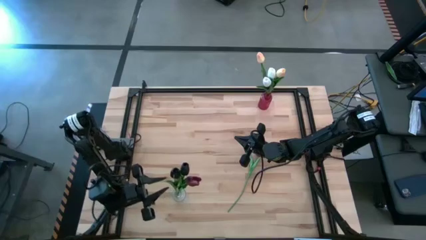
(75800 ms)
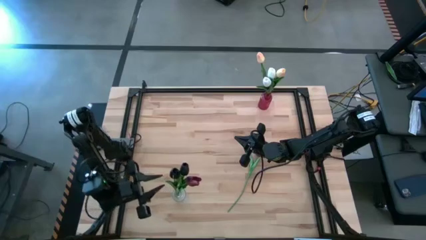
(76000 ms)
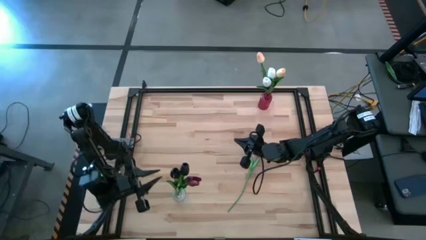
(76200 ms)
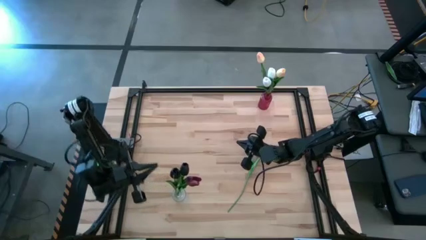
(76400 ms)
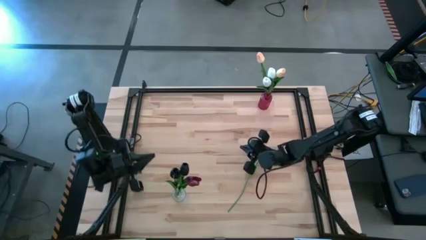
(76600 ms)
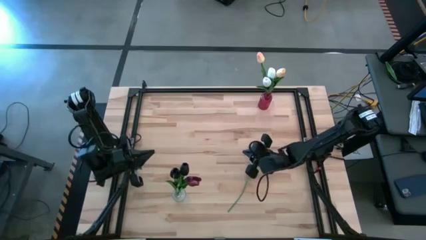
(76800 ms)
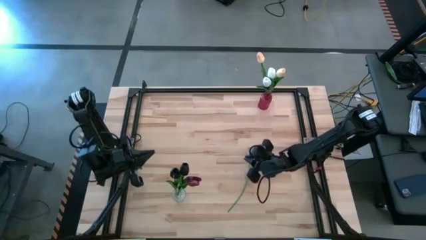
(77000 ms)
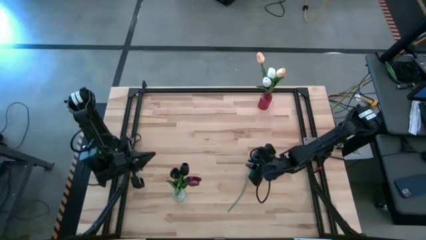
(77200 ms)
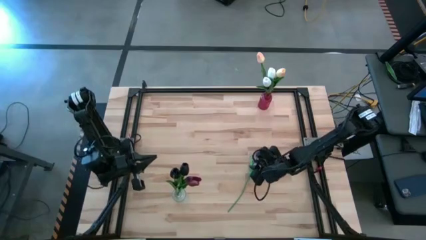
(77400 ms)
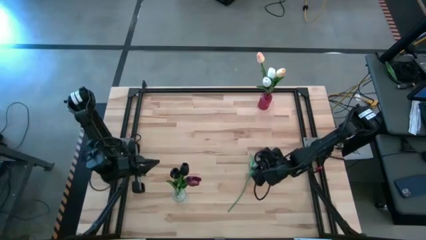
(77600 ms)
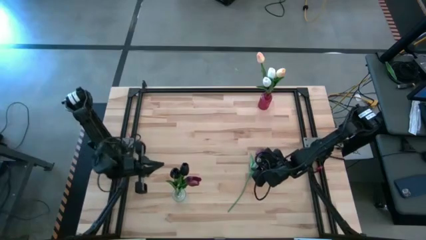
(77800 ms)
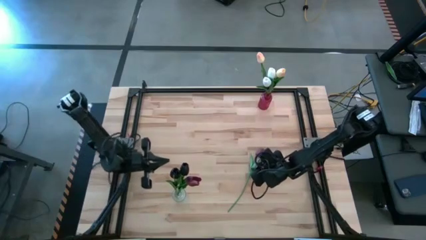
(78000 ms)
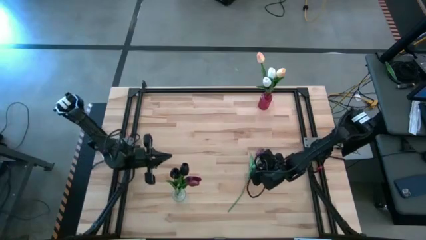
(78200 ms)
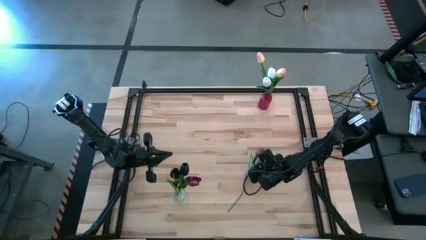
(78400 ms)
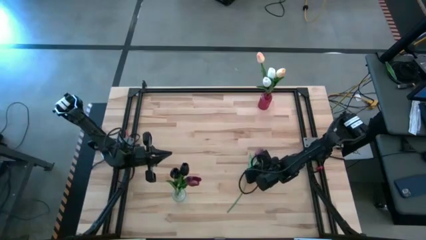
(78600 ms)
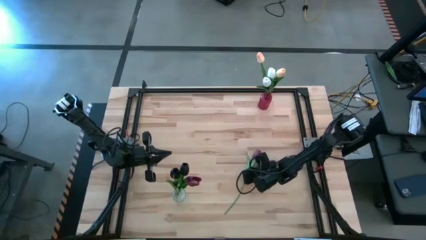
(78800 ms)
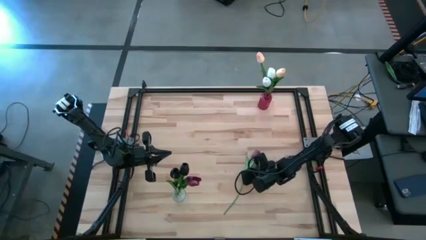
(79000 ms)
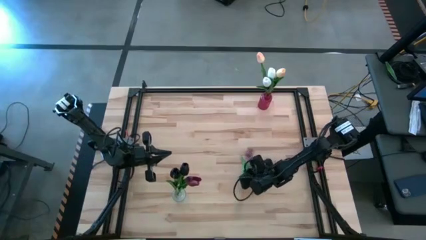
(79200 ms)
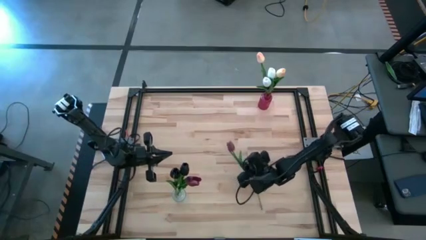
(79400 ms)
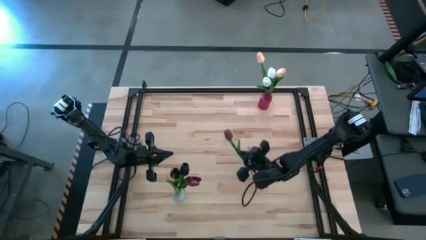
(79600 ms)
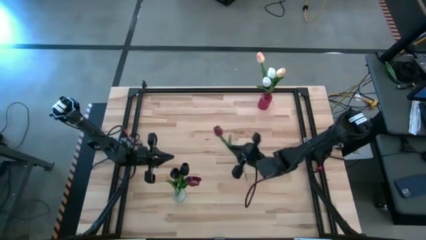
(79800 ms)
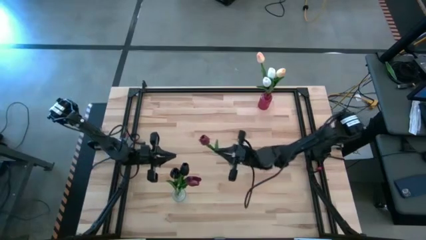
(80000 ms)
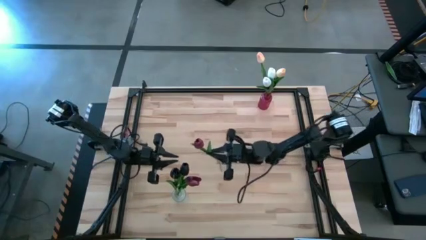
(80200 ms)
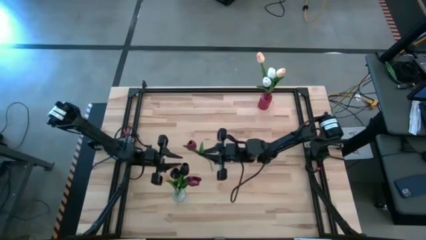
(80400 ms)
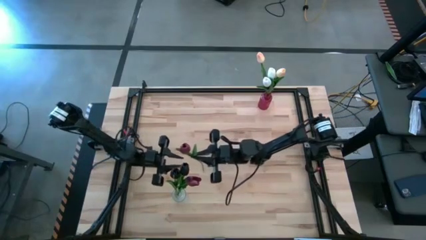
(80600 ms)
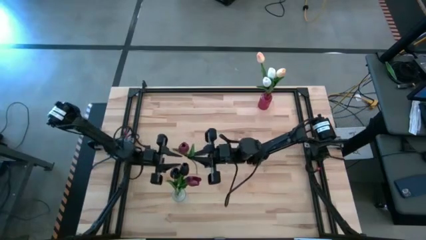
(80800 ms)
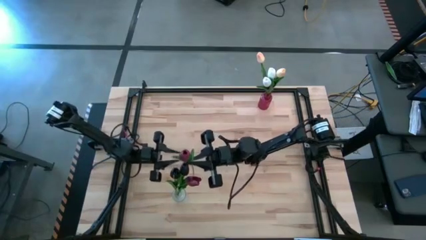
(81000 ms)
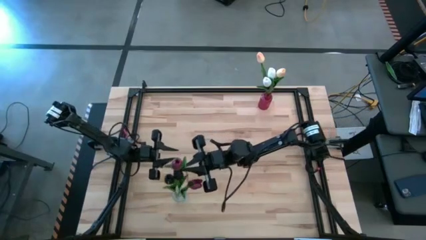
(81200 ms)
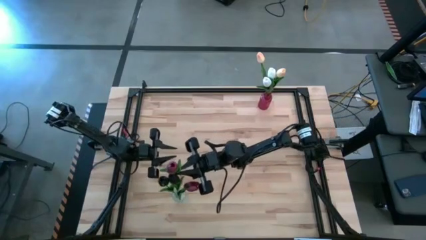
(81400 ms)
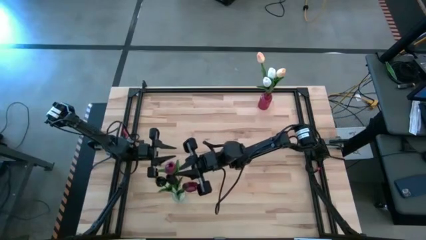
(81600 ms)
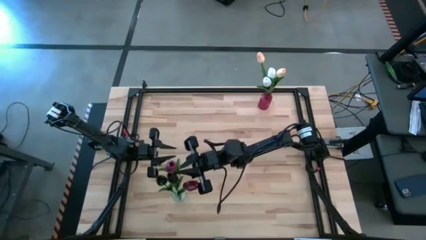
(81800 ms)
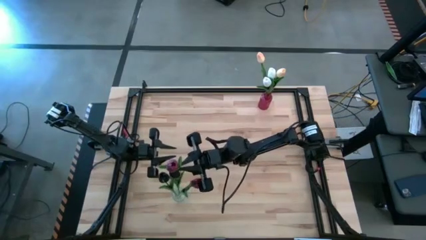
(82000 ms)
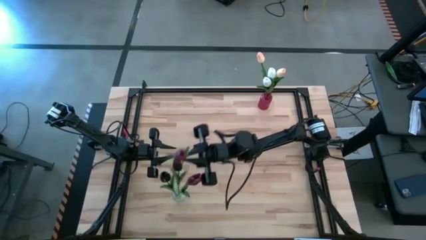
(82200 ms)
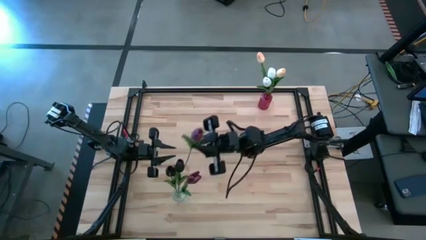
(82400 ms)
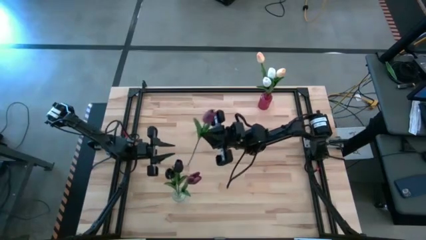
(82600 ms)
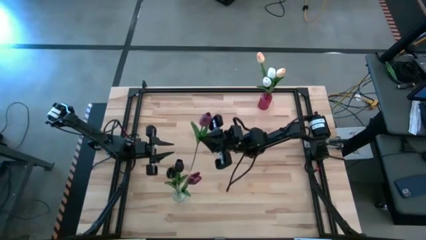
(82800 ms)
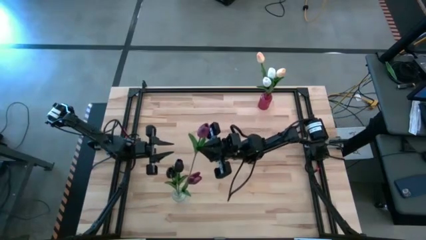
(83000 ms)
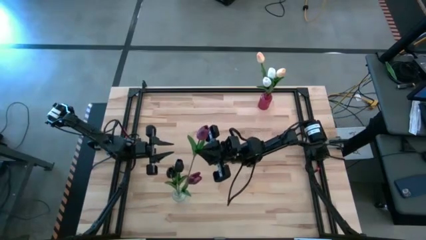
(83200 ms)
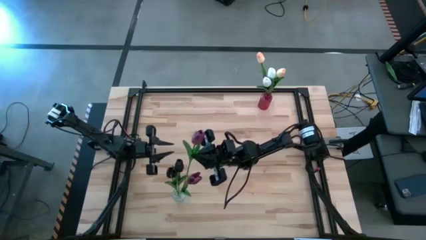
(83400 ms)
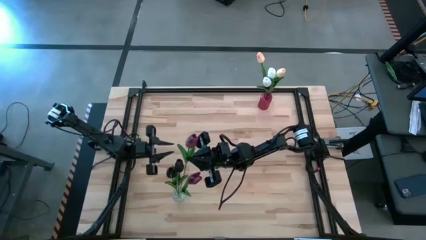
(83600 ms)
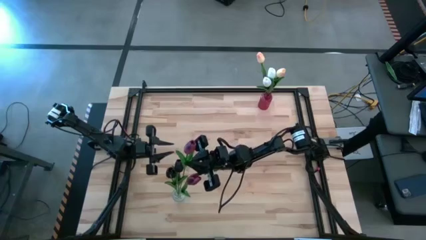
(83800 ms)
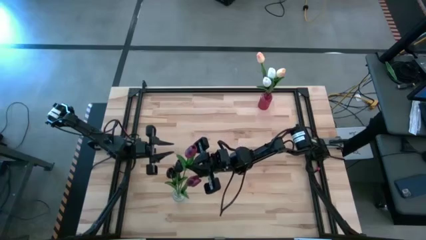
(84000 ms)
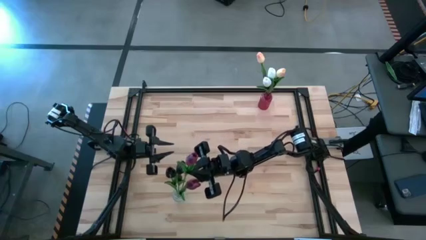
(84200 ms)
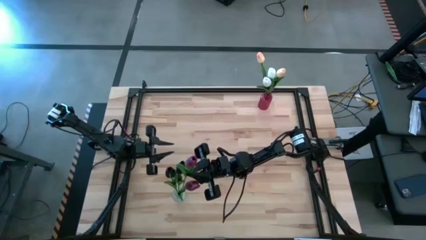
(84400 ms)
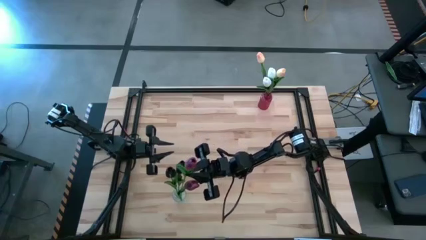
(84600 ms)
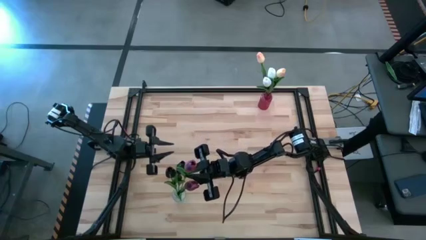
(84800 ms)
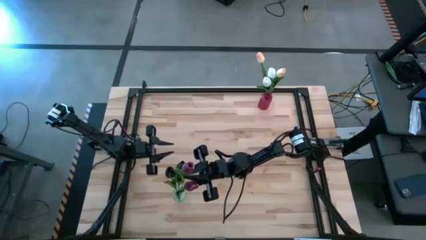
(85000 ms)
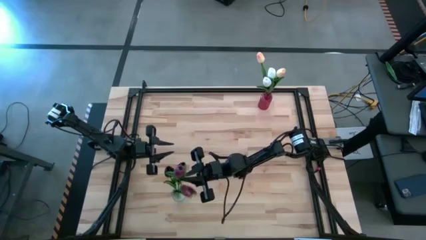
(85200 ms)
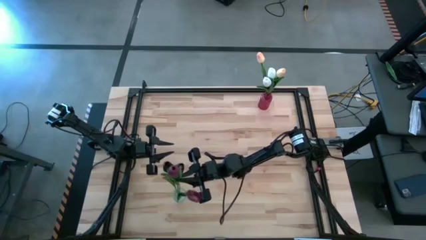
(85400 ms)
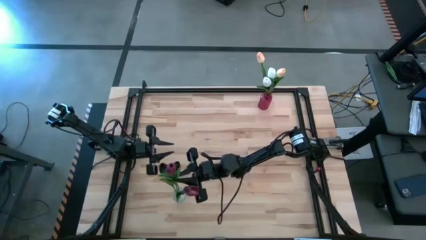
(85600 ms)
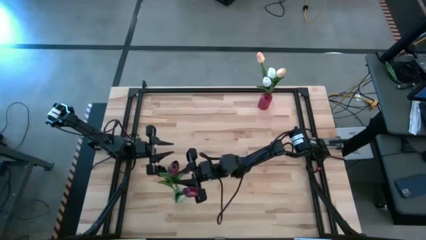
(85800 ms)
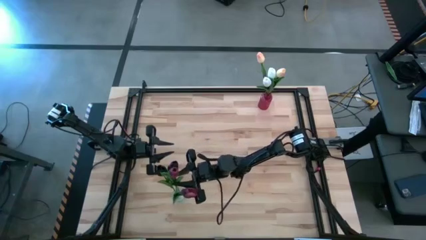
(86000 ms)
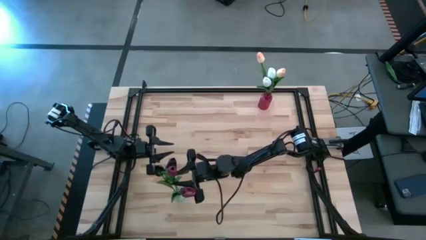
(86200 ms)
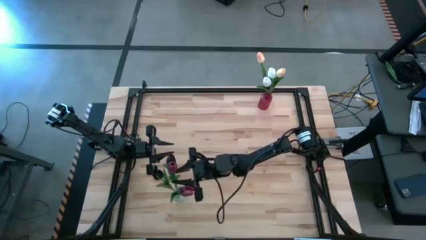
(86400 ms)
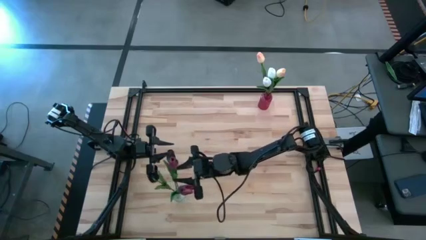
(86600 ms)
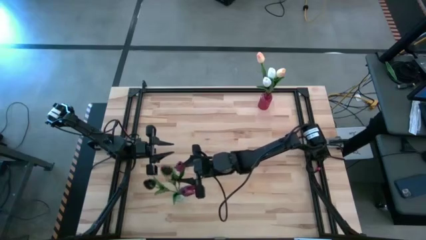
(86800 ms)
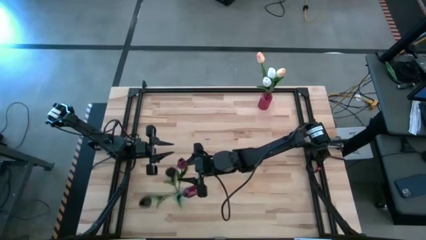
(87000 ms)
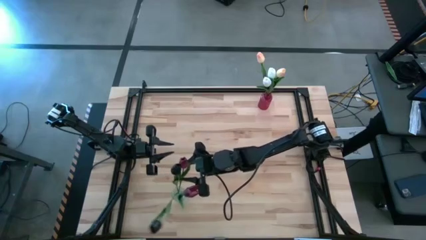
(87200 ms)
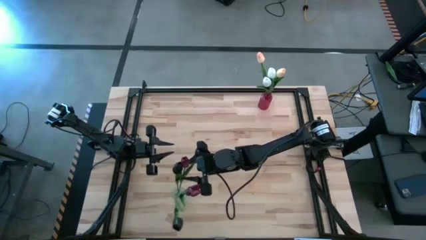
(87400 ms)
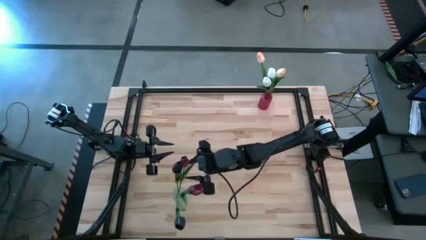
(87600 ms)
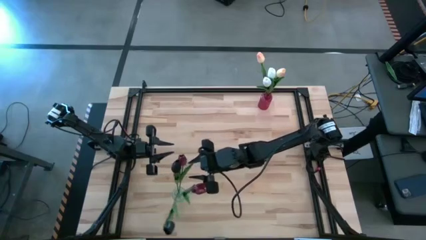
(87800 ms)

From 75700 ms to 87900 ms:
Task: Sort flowers into vase by color
Put the red flower into the transparent vase
